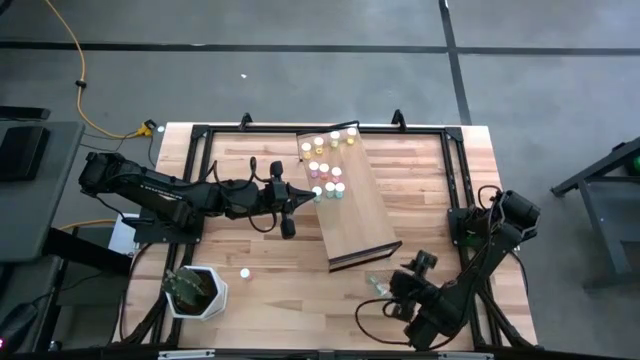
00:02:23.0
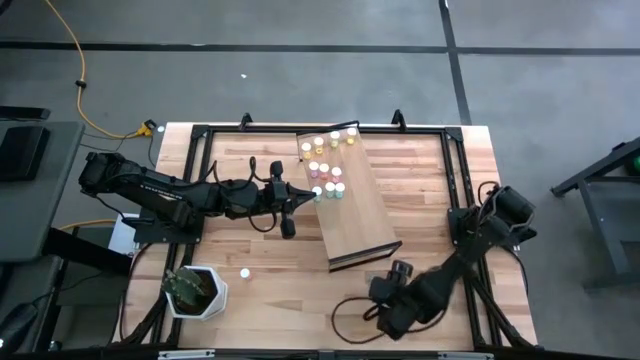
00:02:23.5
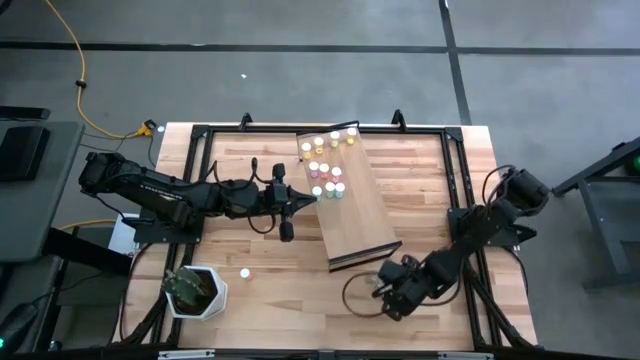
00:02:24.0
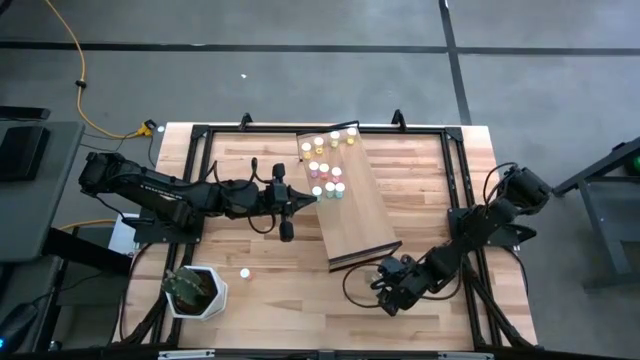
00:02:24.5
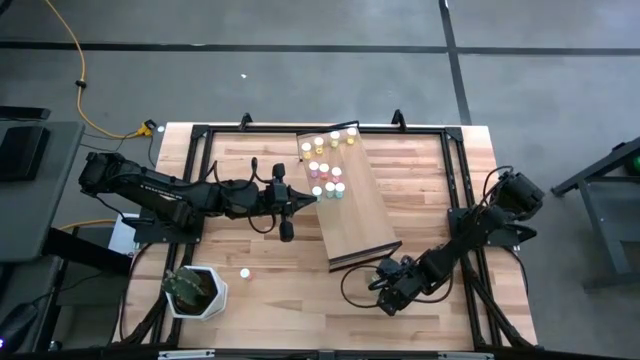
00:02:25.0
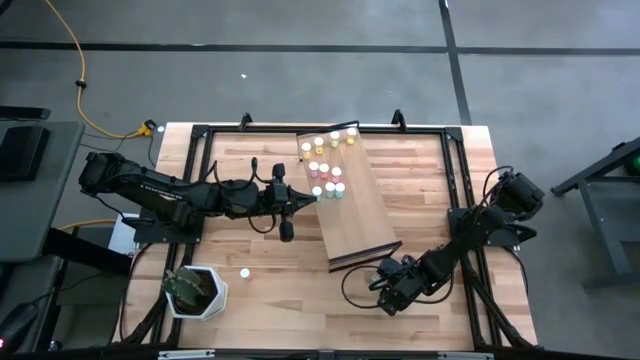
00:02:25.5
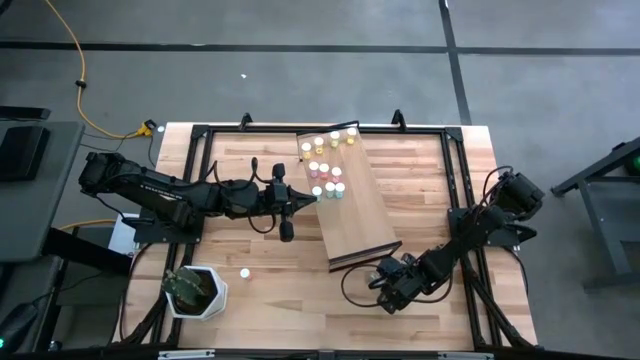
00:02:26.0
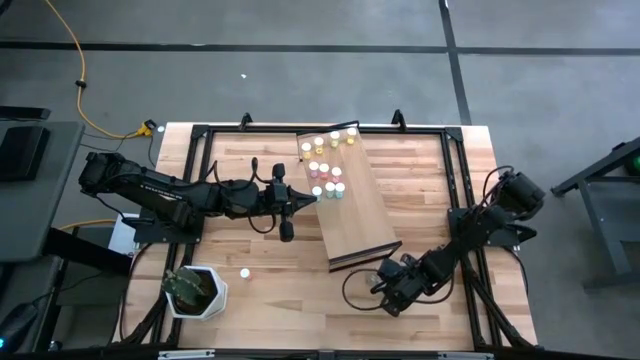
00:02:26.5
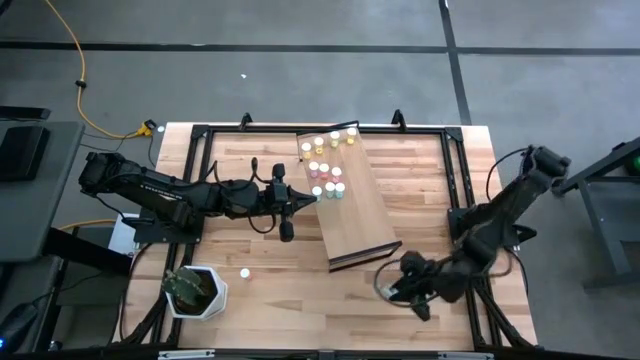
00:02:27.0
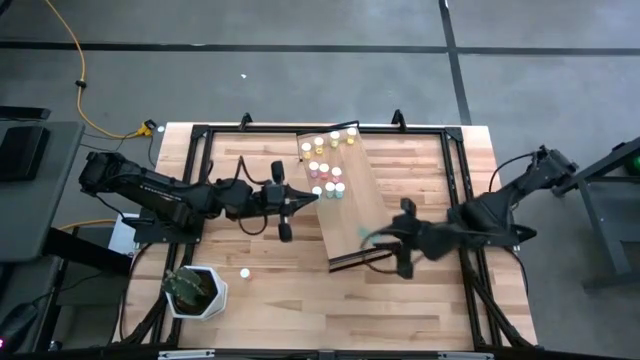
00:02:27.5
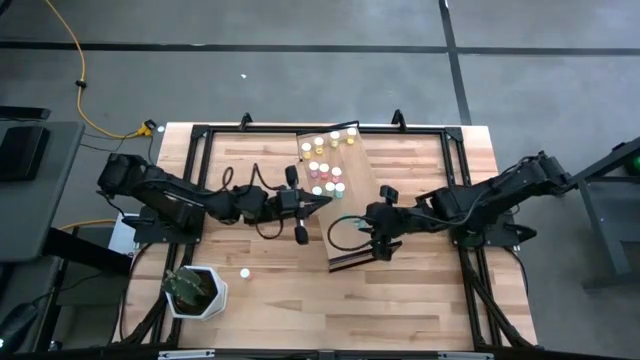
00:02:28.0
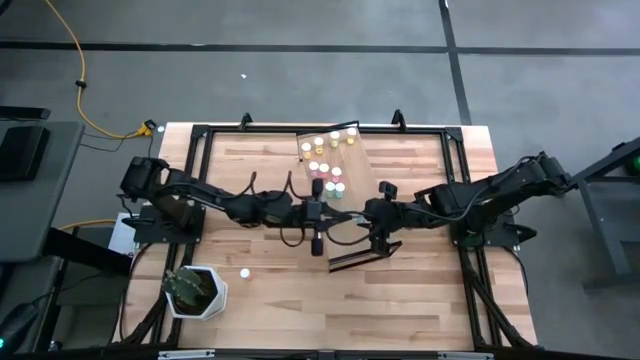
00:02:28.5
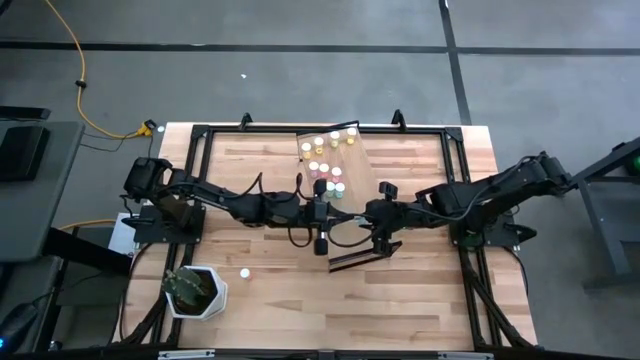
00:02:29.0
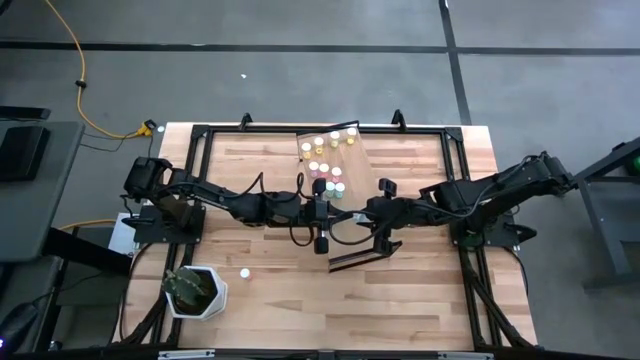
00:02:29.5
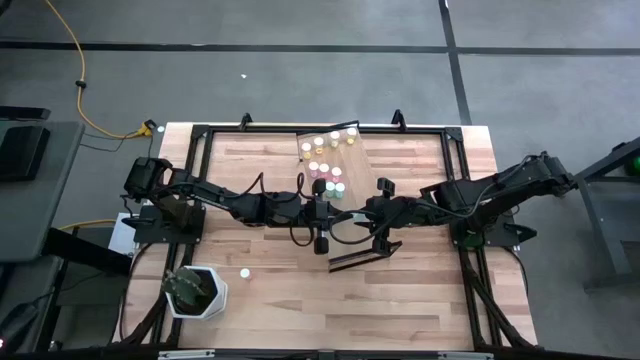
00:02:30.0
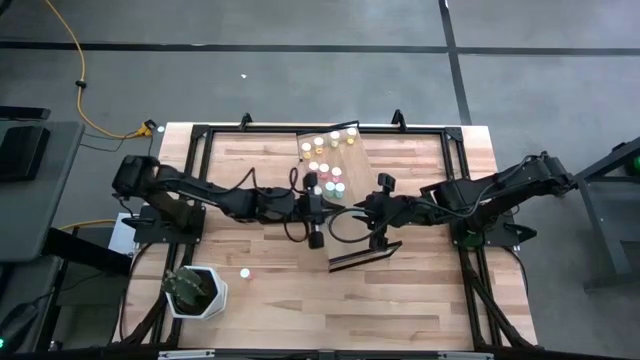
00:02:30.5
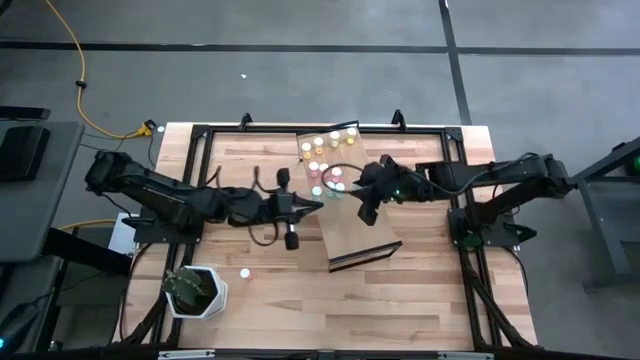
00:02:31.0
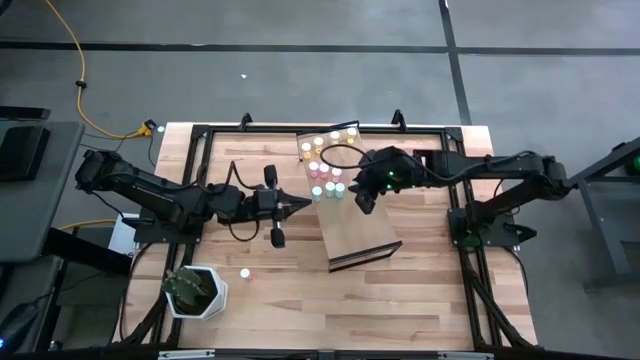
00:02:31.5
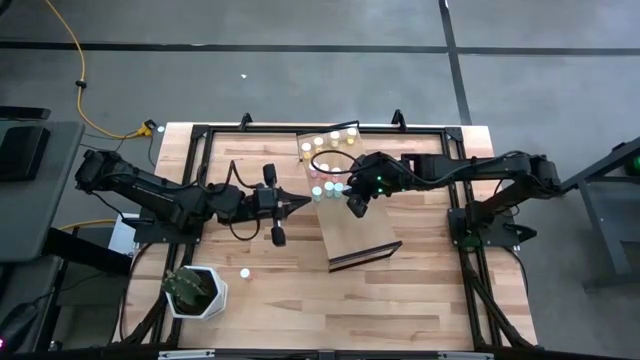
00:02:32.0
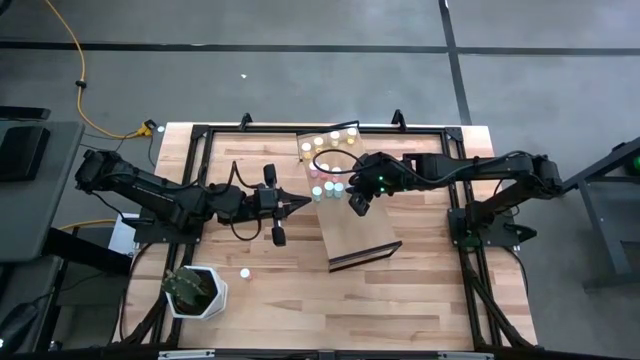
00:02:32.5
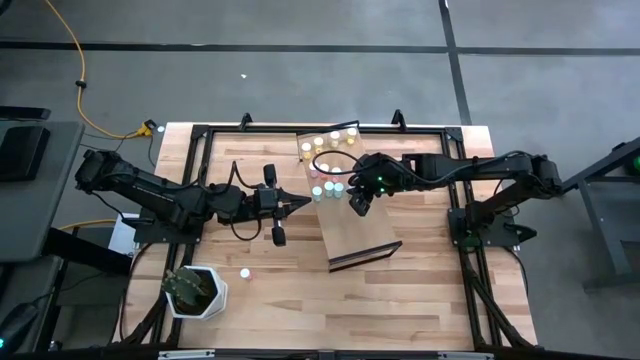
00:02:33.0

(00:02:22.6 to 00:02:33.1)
Task: Pick and place medicine bottles onto shelf by color
Put the blue pill bottle on the shelf aligned with the other blue pill bottles

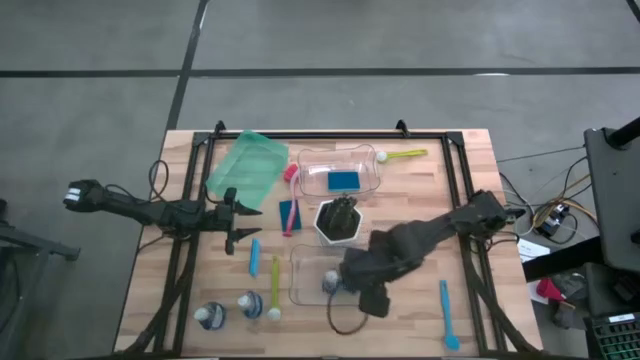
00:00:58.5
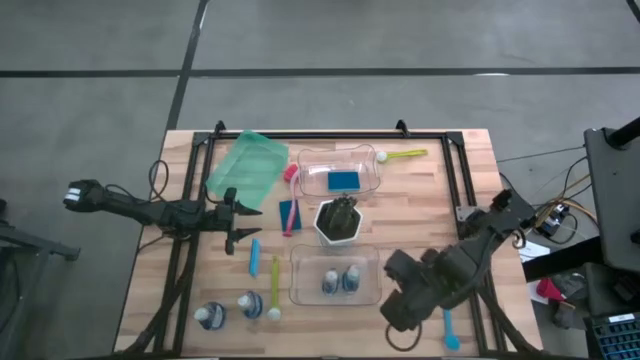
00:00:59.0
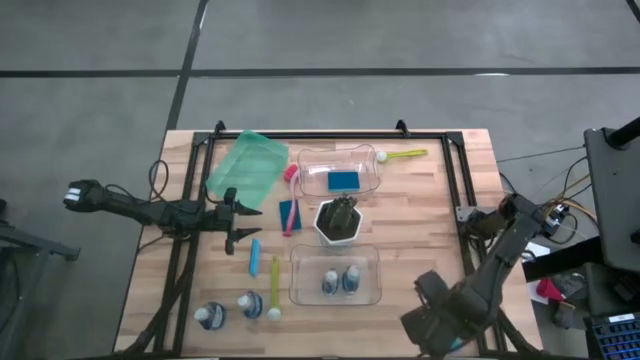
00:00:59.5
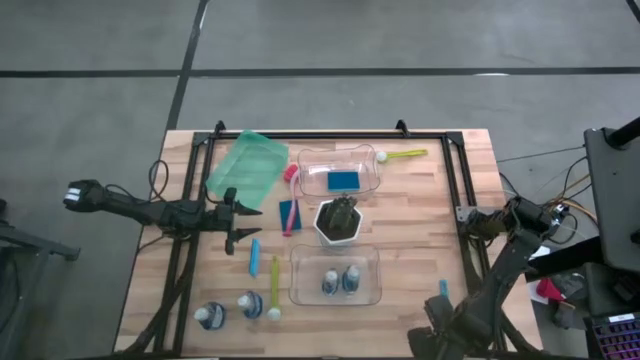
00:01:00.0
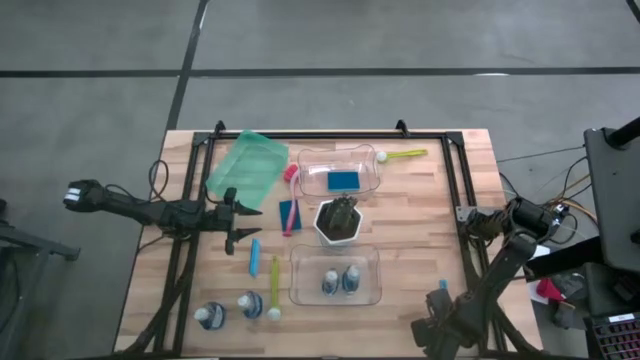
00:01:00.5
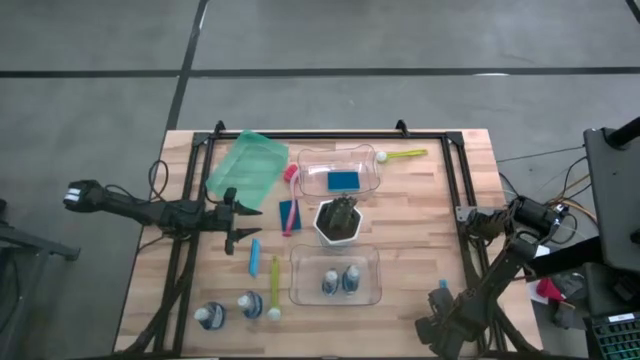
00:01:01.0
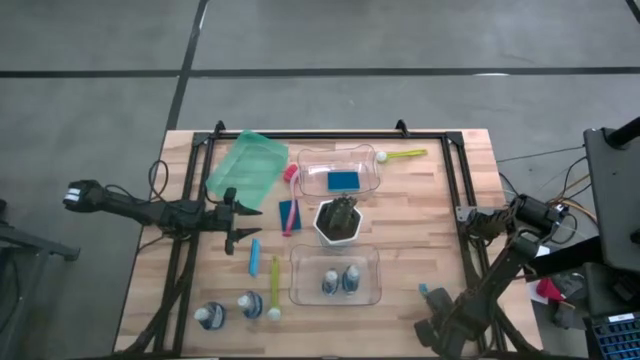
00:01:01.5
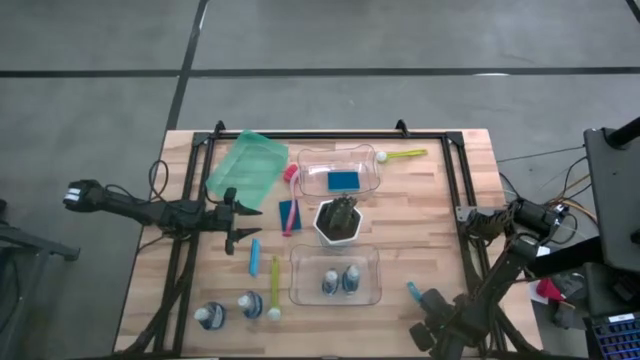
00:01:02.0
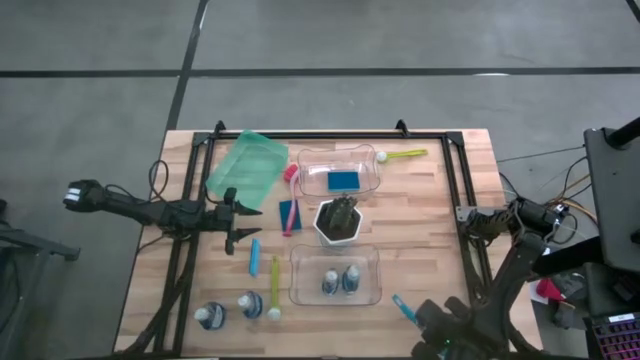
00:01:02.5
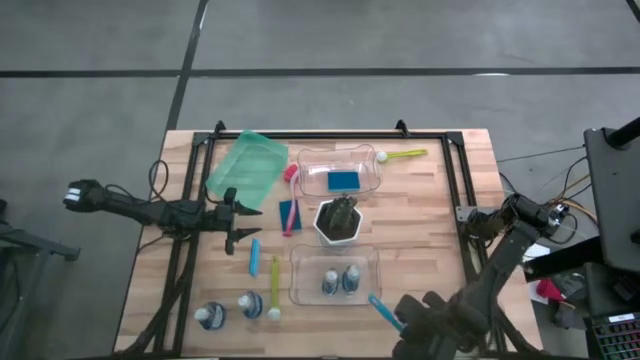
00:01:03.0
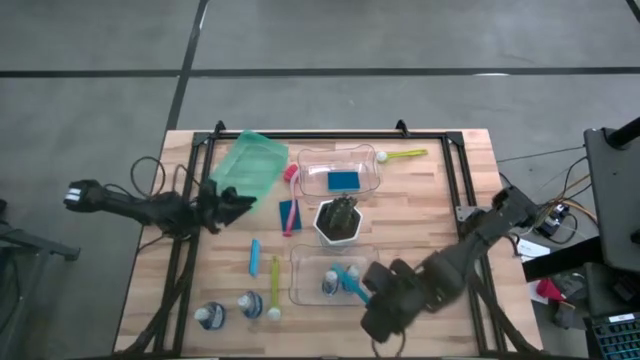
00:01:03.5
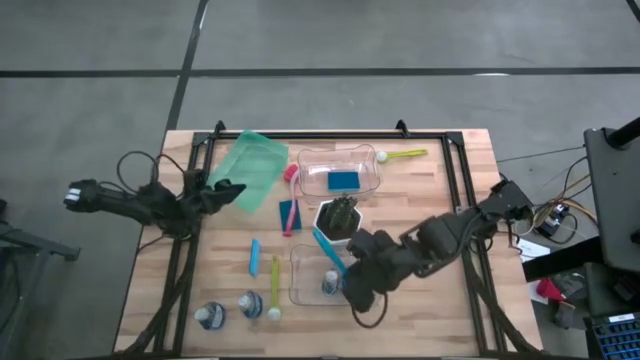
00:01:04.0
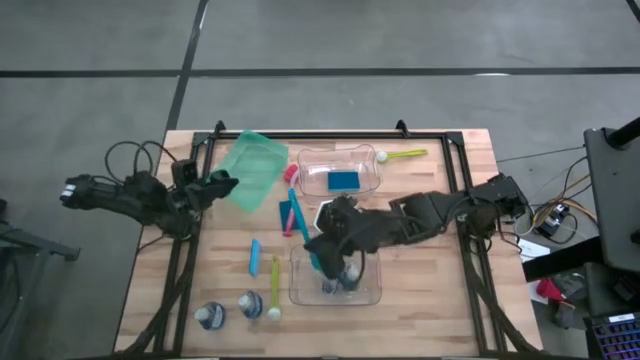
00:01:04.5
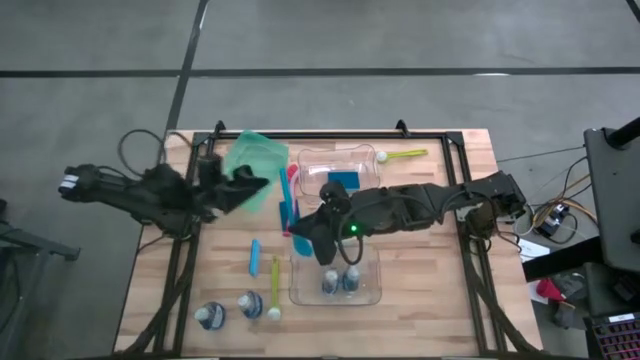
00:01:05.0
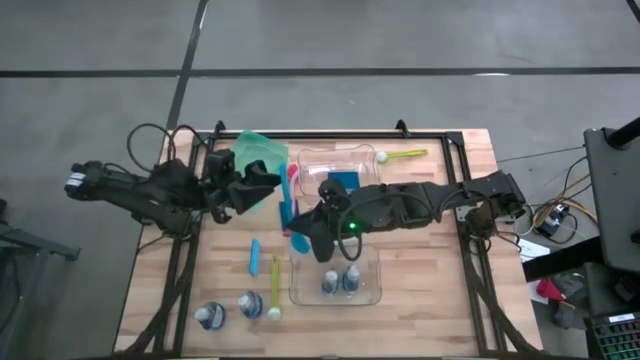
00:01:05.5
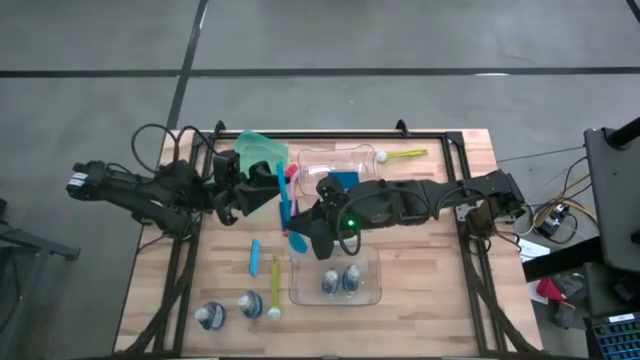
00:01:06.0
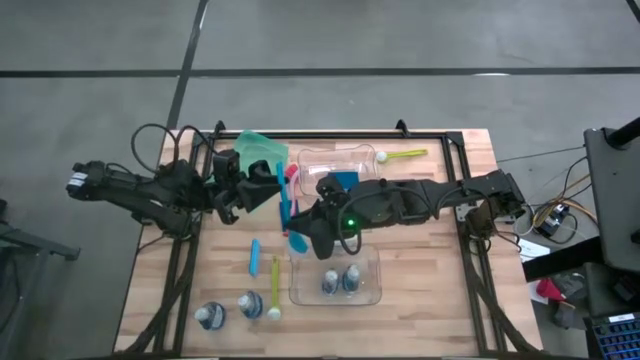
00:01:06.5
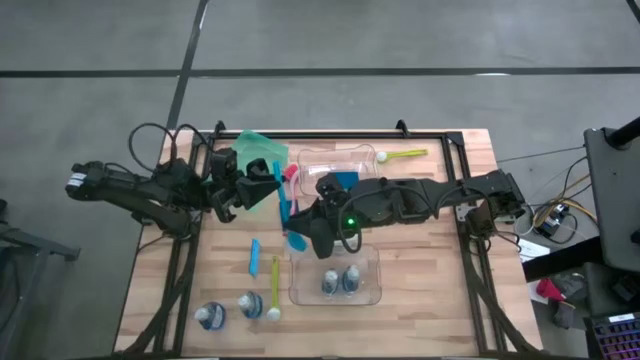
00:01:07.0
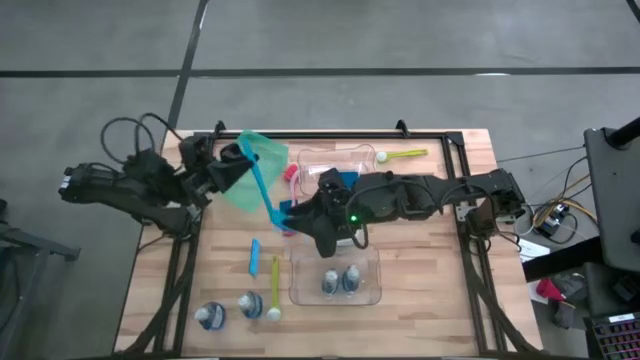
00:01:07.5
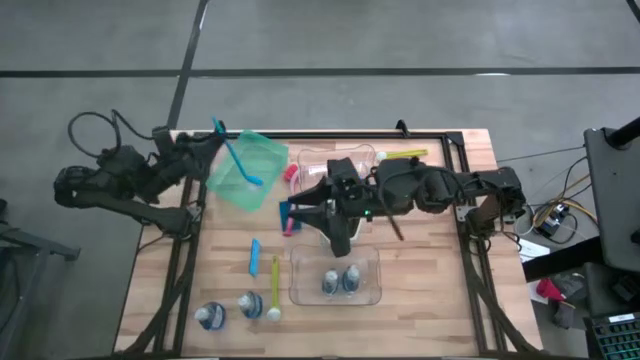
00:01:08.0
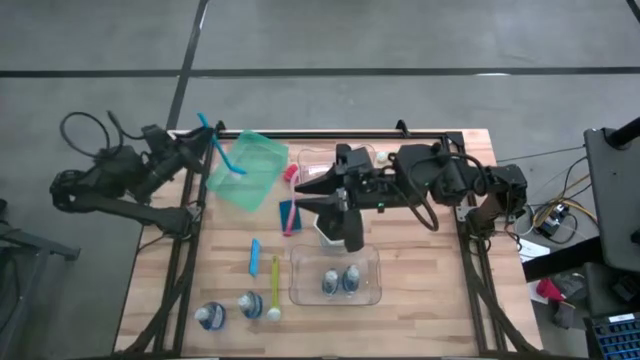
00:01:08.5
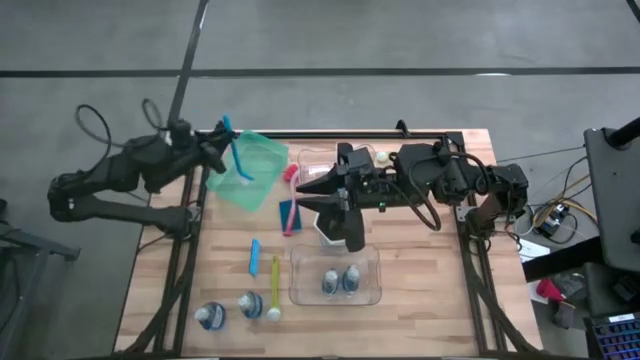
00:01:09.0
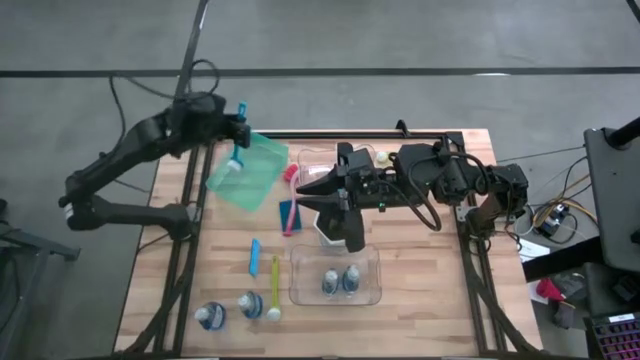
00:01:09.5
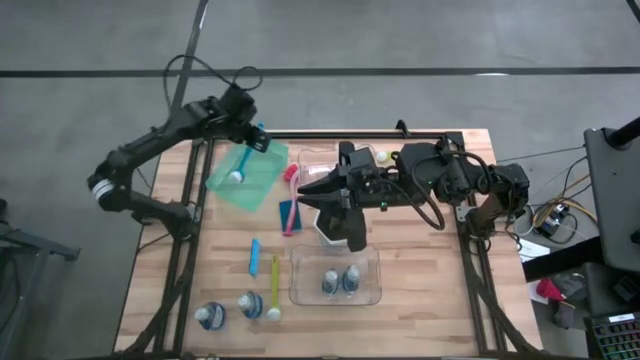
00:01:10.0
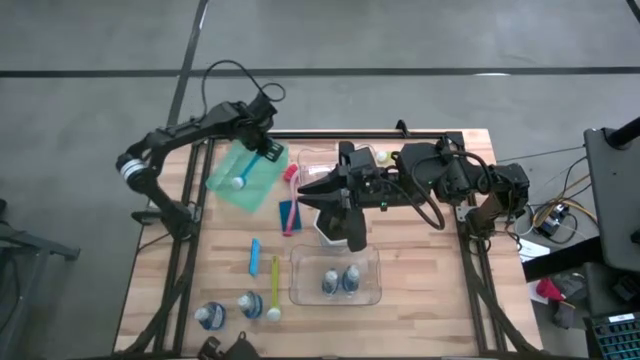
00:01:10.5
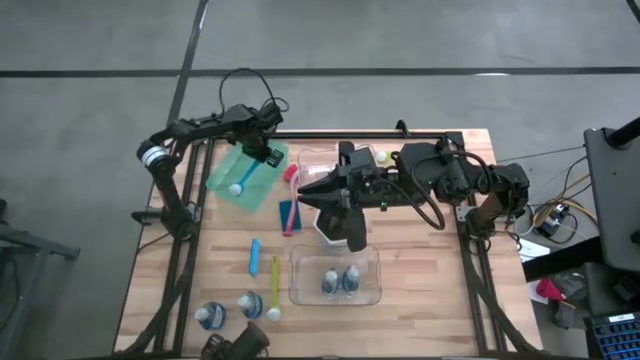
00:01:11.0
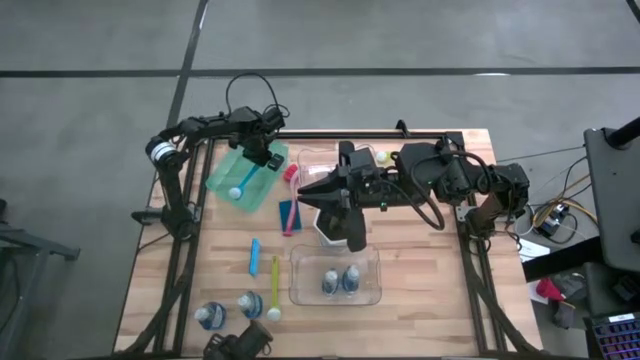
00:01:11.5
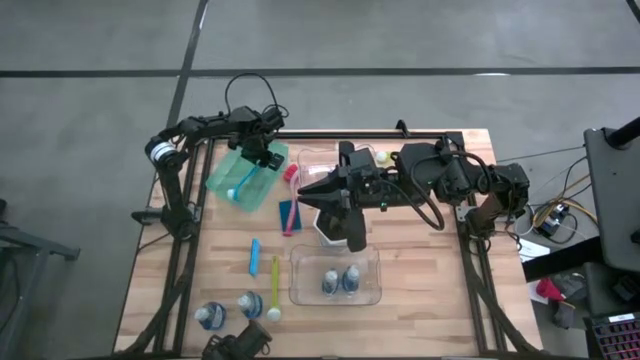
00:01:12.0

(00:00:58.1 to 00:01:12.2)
Task: Pick & Place Kitchen Sink Supplies
Put the blue dishwashing brush into the light blue bin
